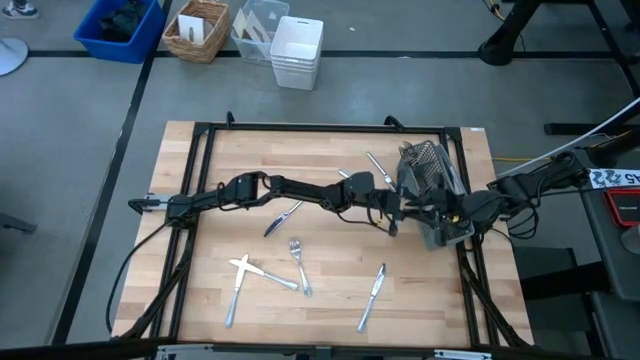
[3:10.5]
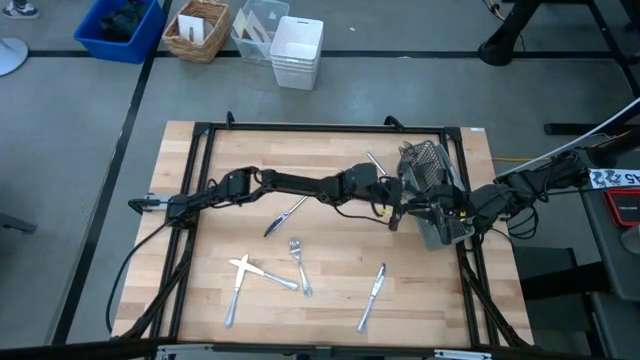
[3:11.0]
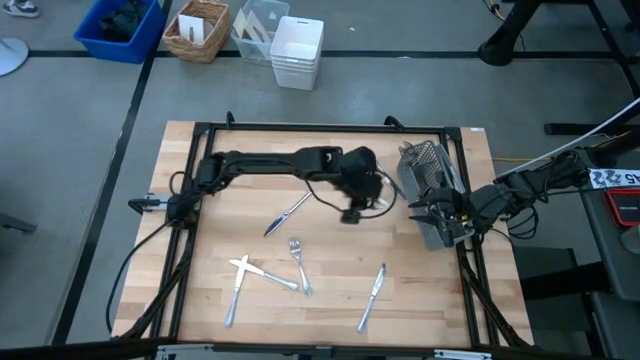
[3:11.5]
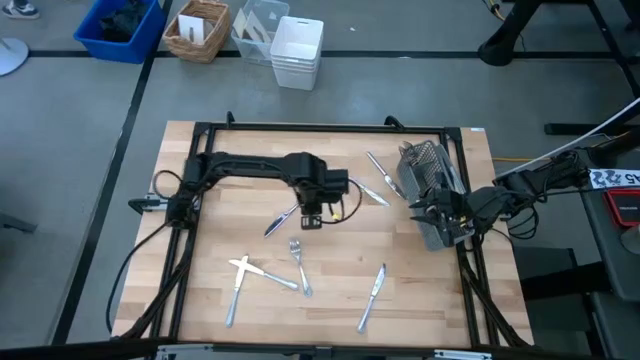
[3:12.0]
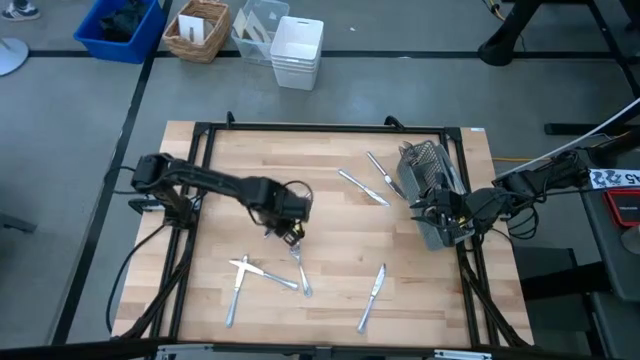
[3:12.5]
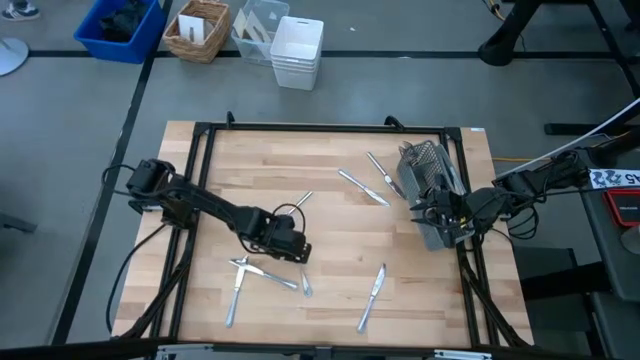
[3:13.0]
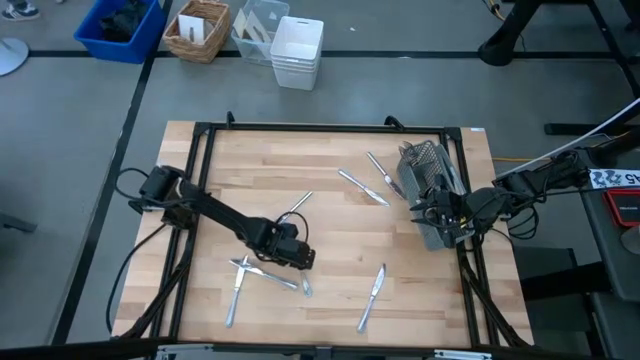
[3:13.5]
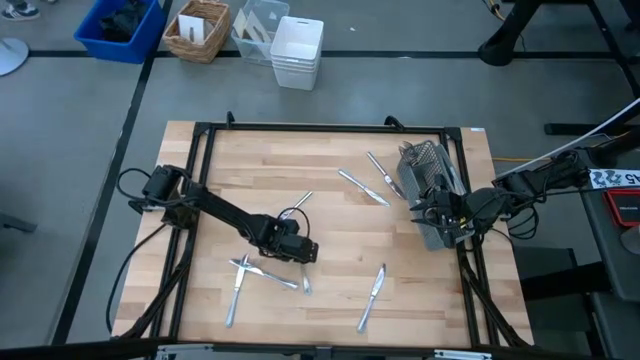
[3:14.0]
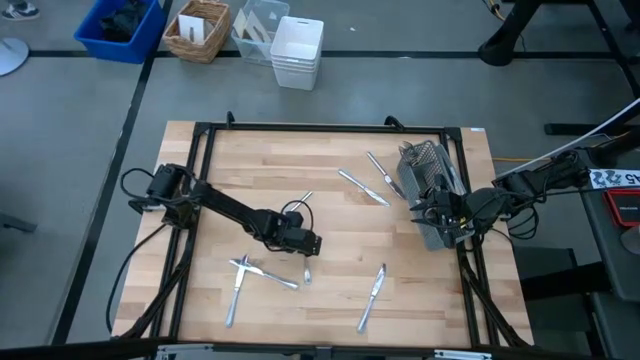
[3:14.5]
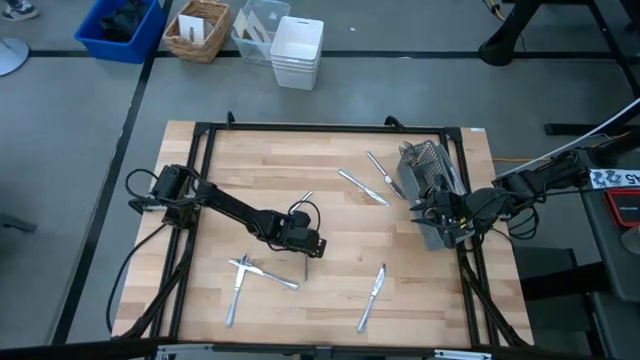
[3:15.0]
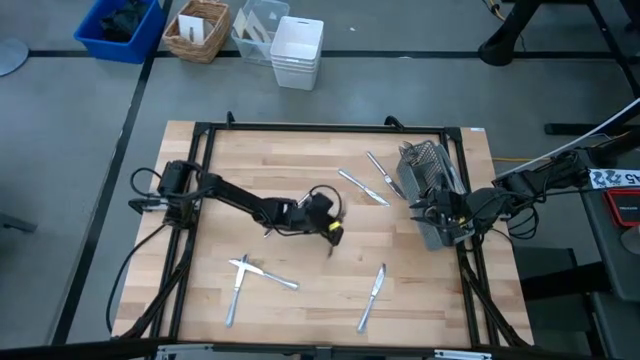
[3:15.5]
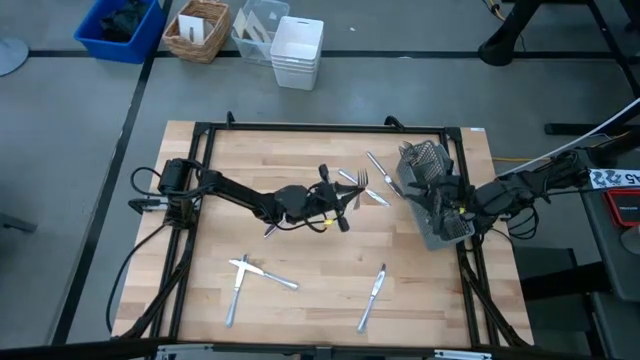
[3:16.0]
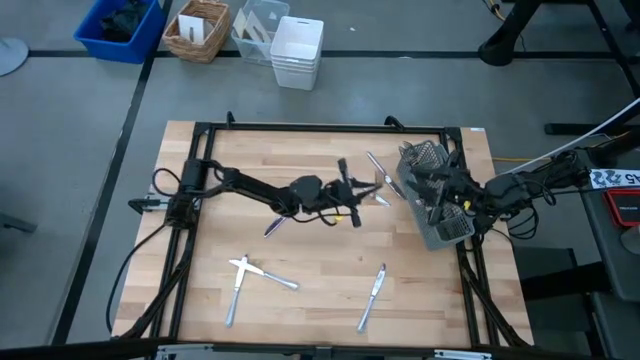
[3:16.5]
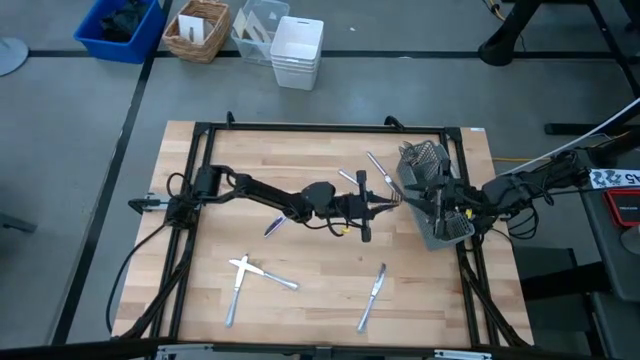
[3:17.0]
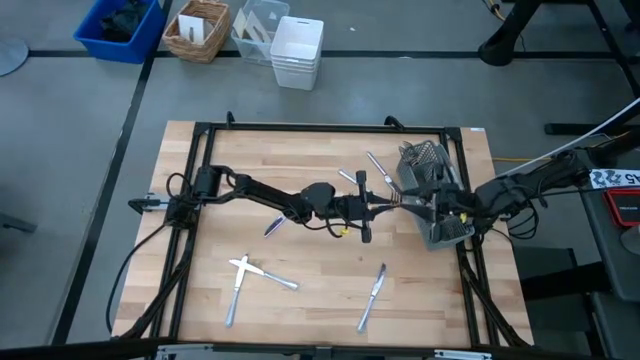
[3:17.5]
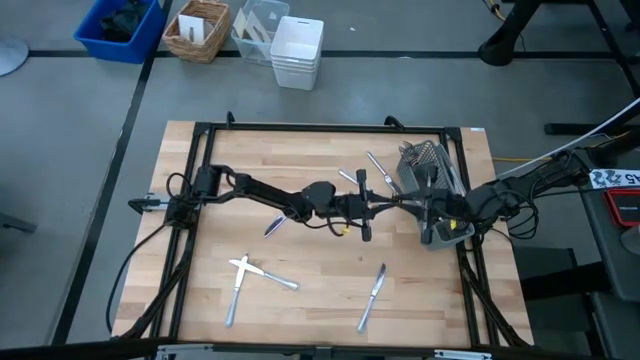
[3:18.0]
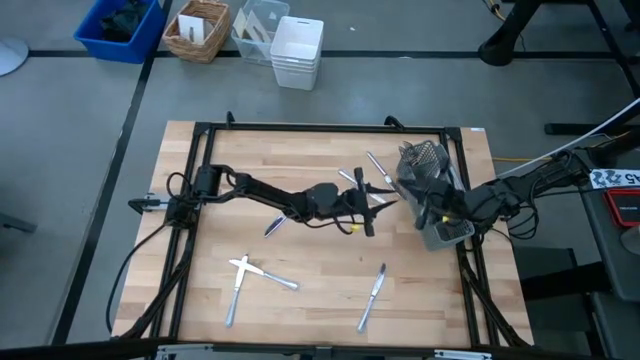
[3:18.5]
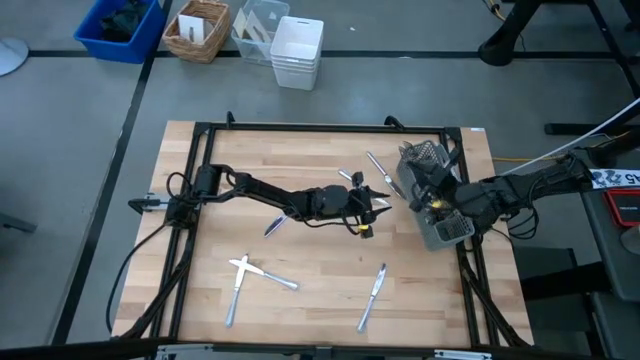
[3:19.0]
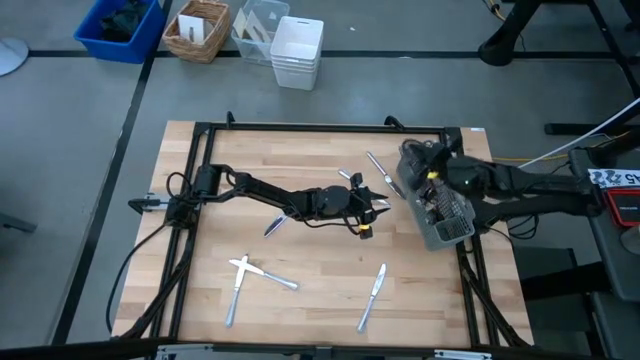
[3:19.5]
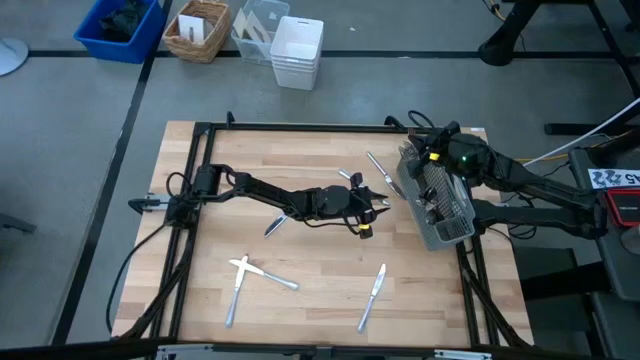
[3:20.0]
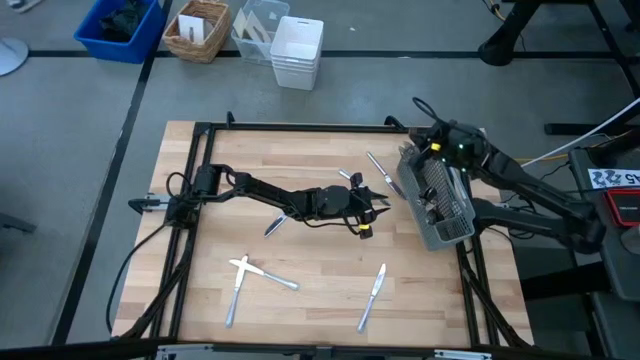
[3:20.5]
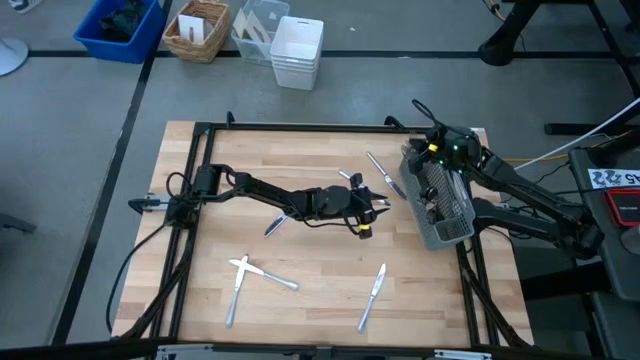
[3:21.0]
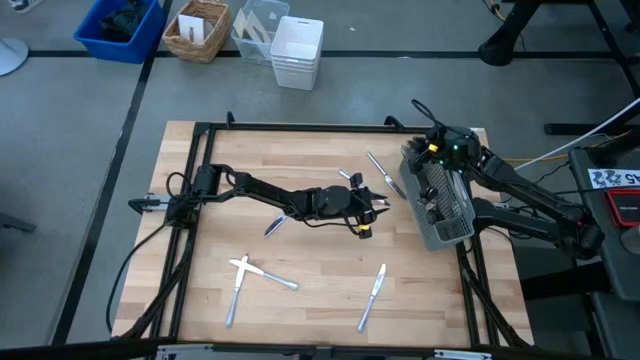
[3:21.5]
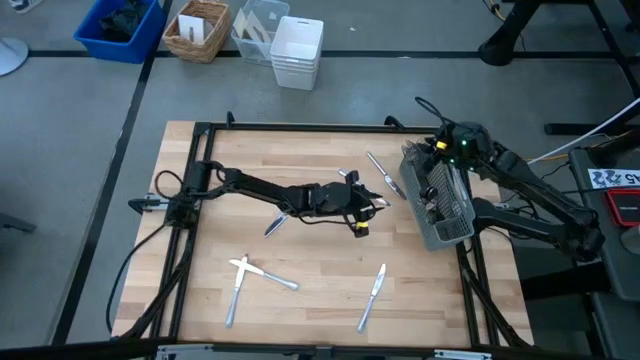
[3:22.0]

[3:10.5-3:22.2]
Task: Sort silverware
Put the fork into the left section of the utensil holder

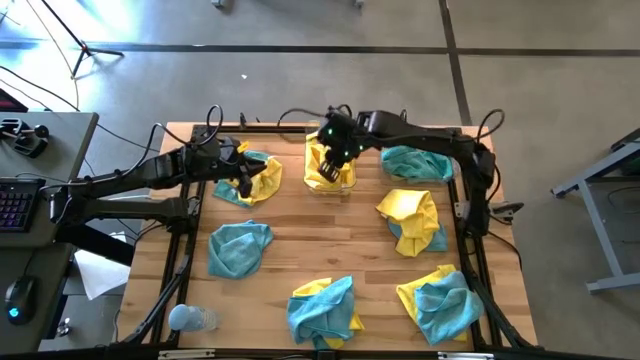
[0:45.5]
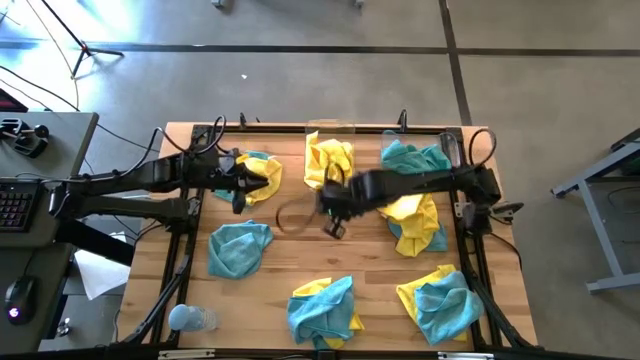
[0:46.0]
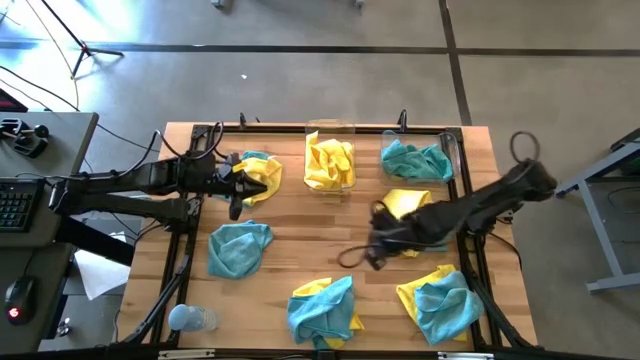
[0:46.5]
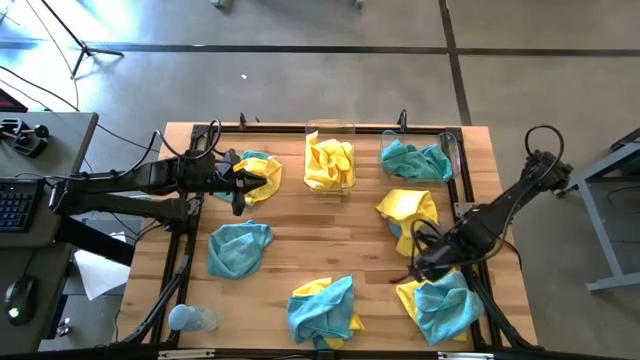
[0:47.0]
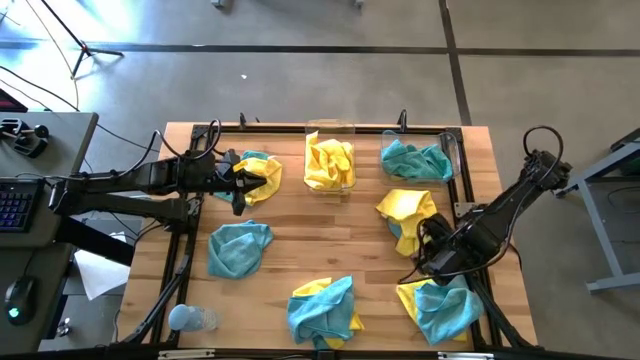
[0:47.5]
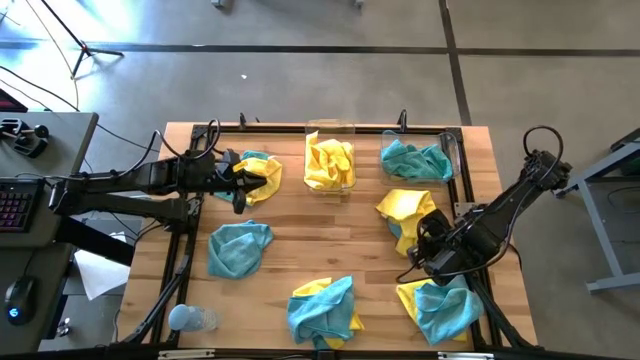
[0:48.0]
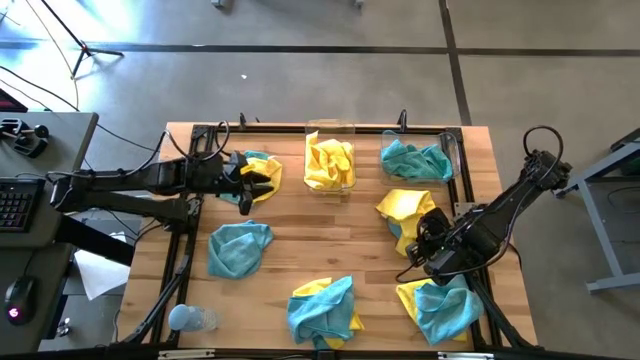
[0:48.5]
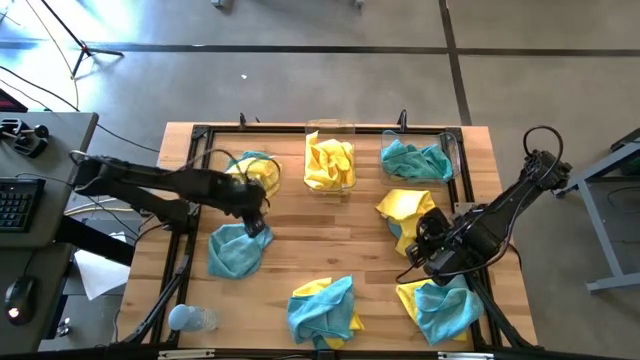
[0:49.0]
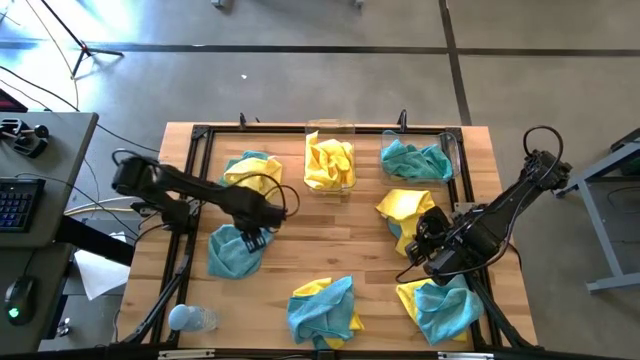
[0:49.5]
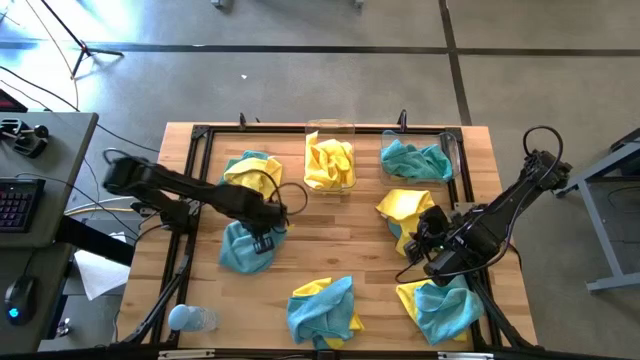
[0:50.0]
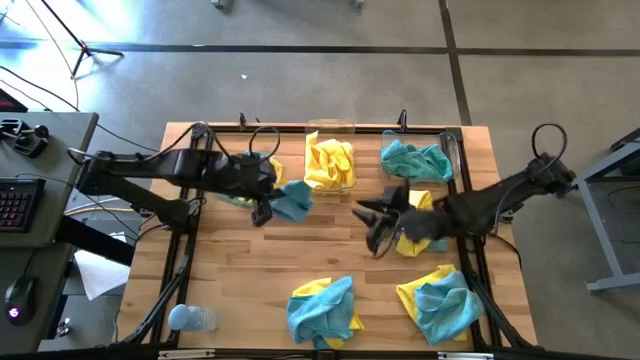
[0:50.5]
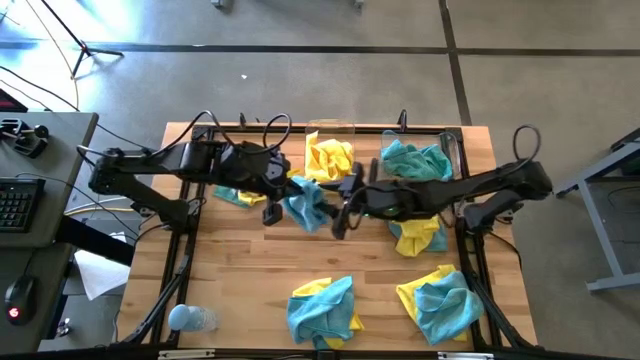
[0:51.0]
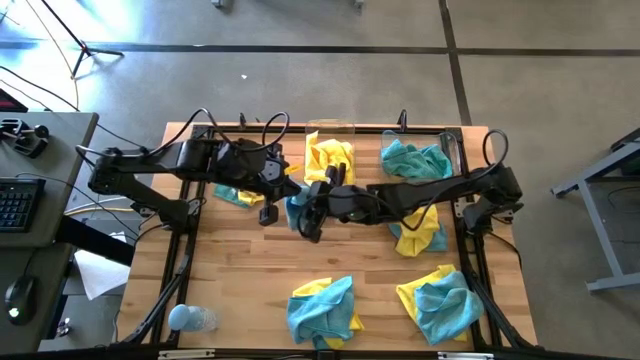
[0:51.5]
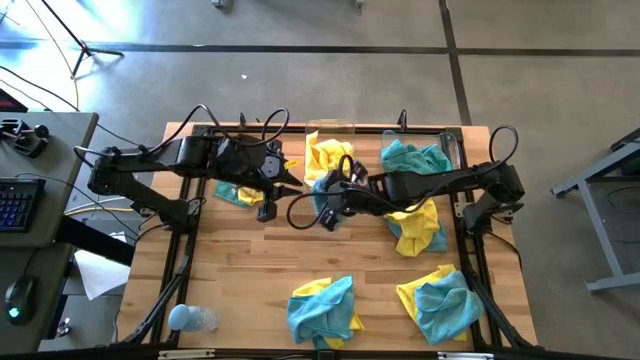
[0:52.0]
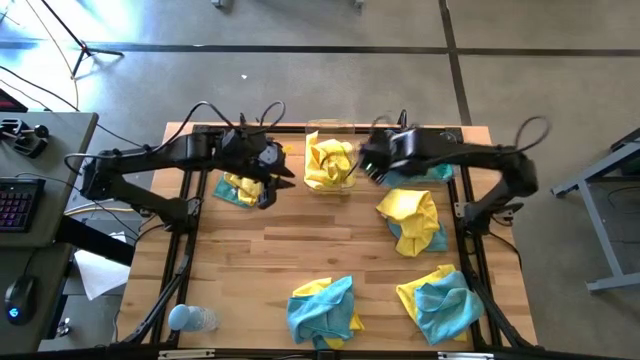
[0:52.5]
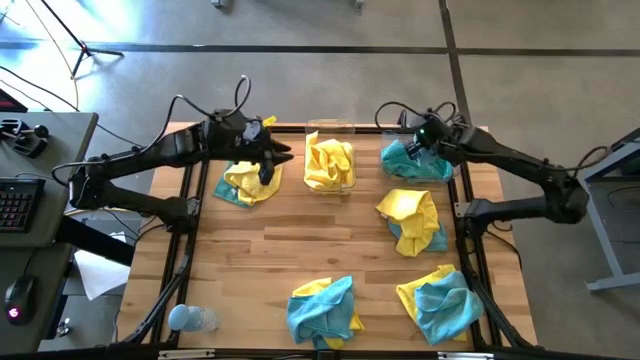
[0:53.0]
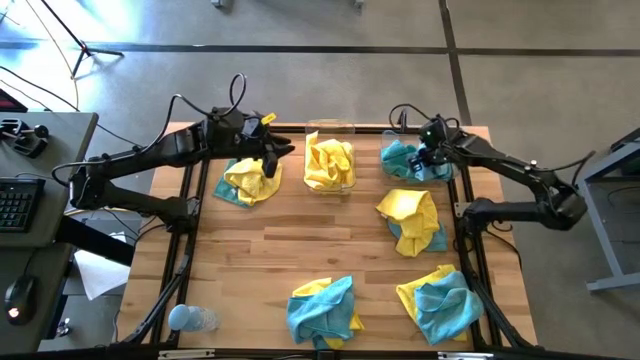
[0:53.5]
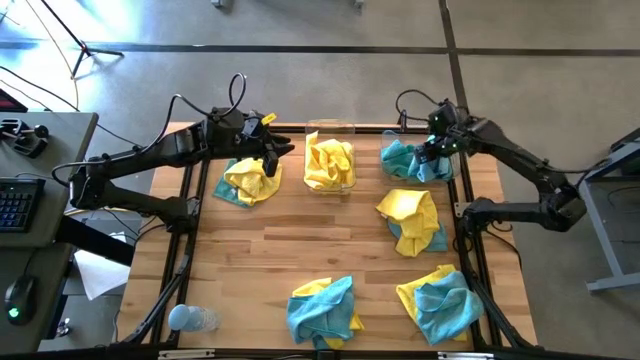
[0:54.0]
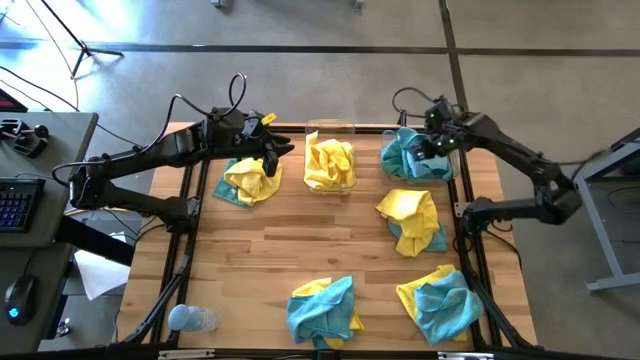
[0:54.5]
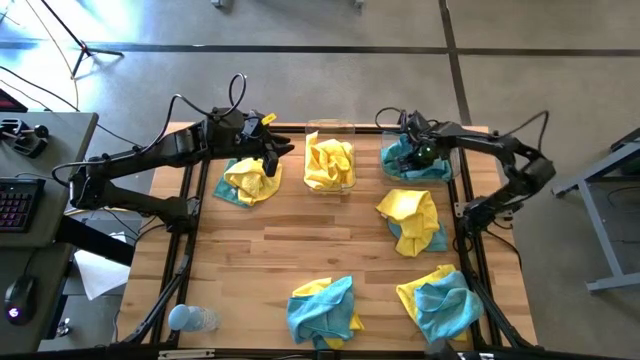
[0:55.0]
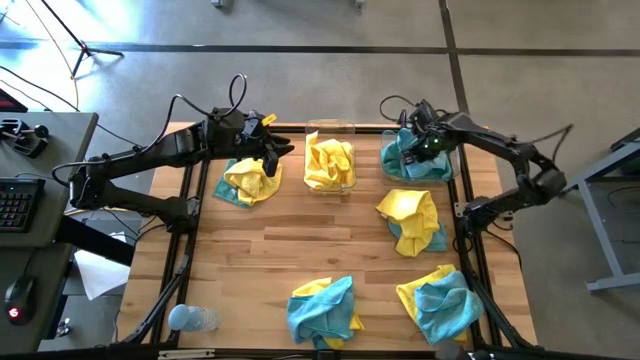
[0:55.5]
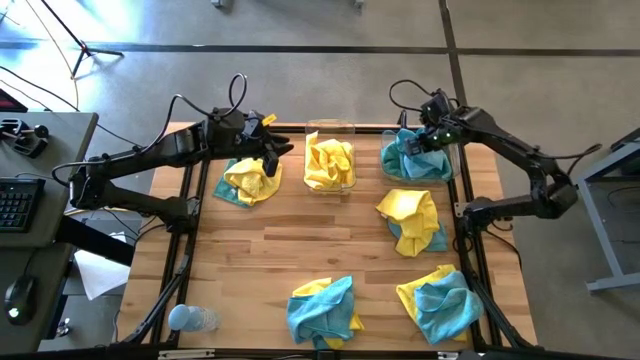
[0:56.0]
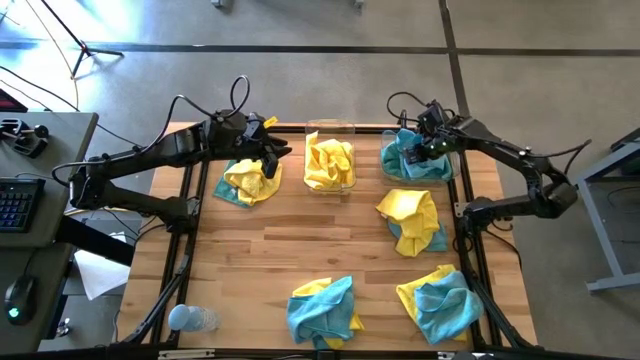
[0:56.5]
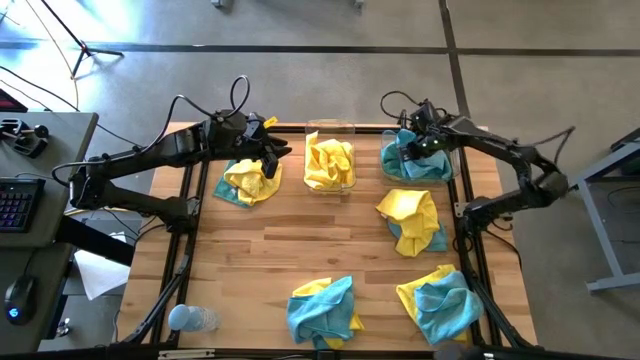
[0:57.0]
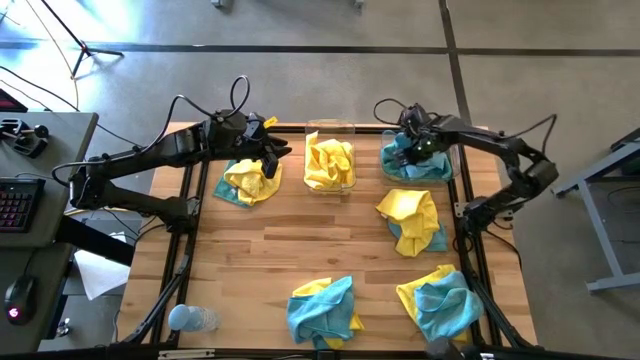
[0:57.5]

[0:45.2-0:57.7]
Task: Sort microfiber towel by color & place in baskets
Put the blue towel into the right transparent bin
